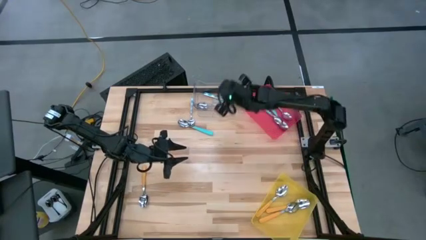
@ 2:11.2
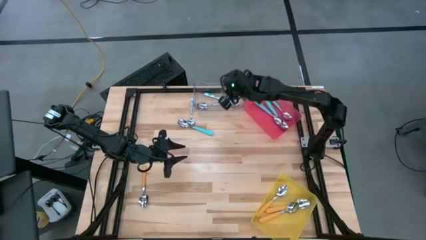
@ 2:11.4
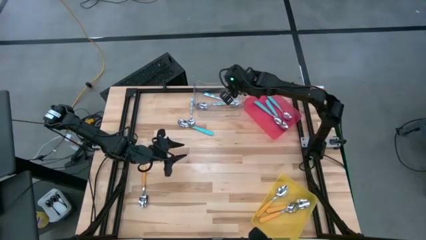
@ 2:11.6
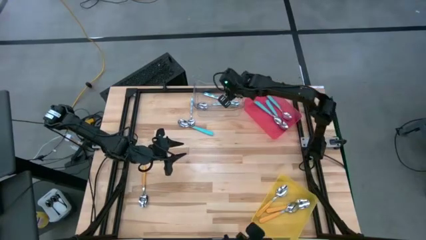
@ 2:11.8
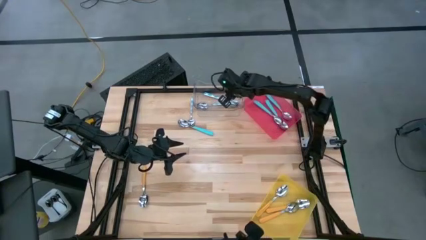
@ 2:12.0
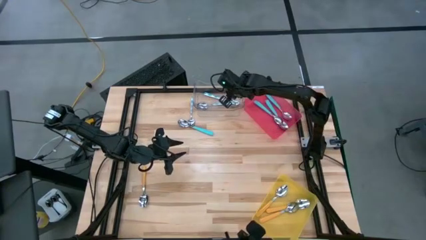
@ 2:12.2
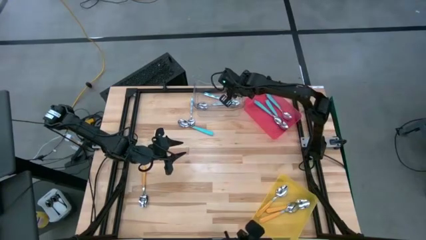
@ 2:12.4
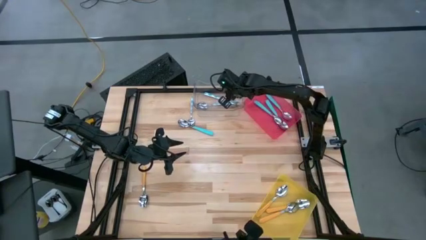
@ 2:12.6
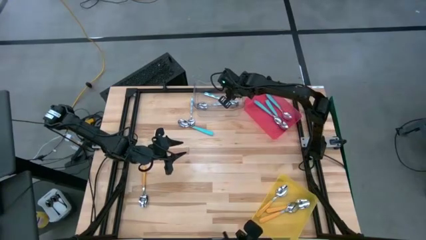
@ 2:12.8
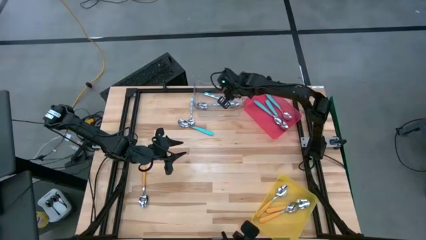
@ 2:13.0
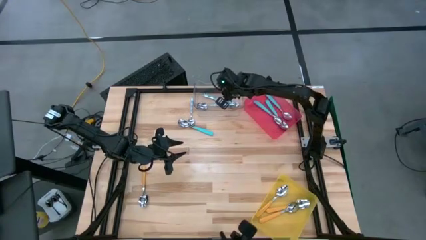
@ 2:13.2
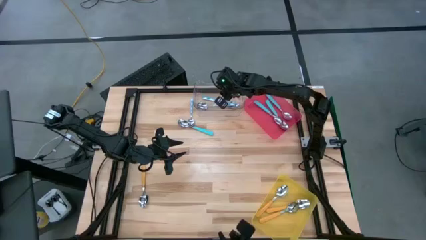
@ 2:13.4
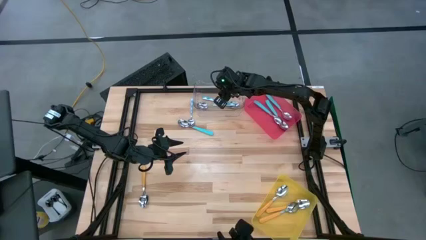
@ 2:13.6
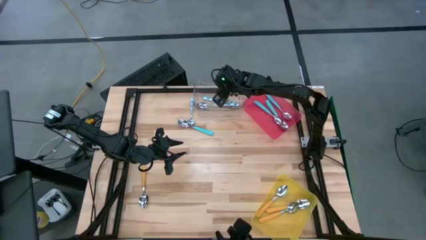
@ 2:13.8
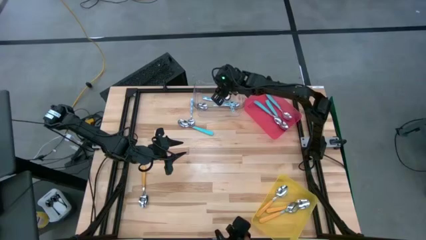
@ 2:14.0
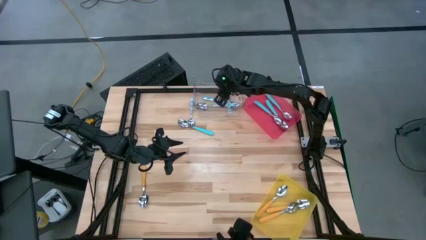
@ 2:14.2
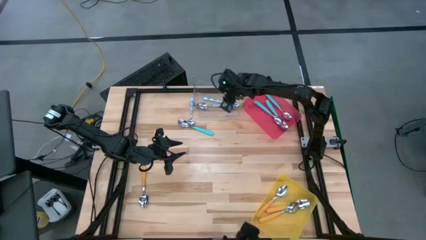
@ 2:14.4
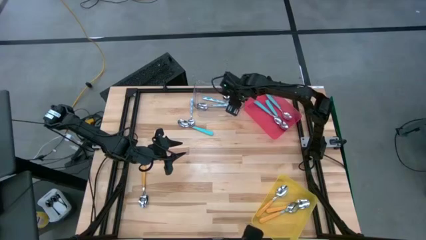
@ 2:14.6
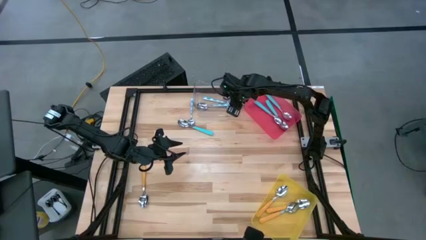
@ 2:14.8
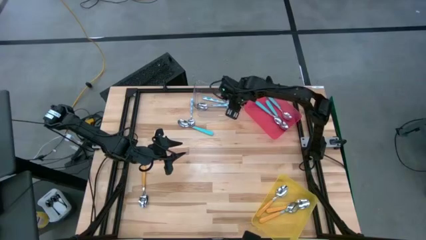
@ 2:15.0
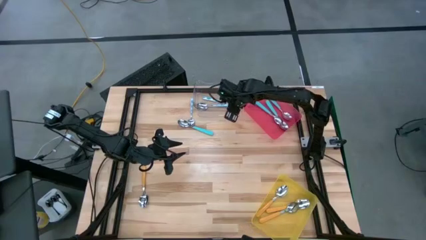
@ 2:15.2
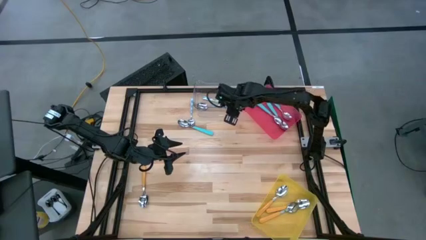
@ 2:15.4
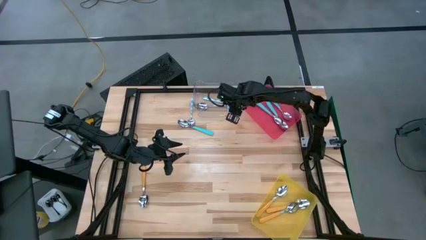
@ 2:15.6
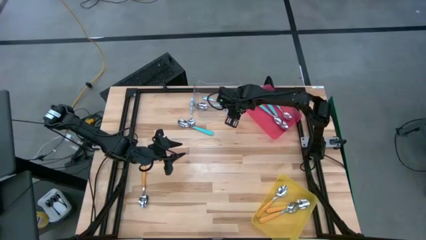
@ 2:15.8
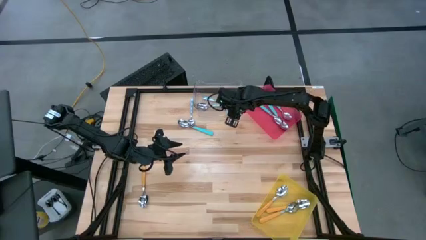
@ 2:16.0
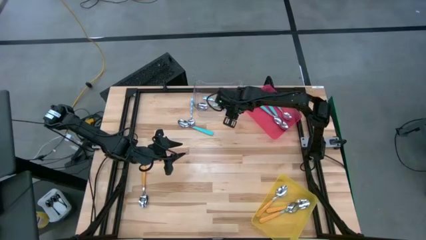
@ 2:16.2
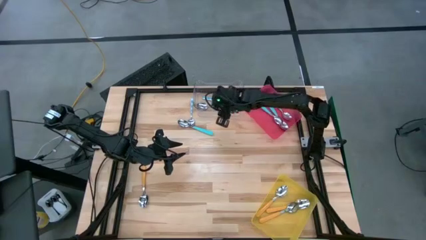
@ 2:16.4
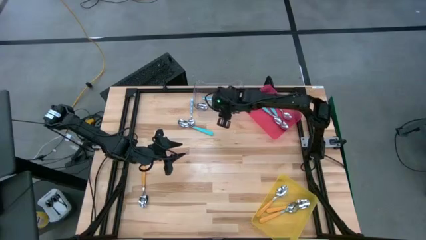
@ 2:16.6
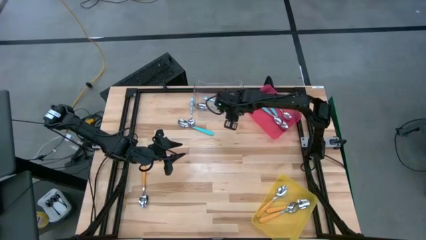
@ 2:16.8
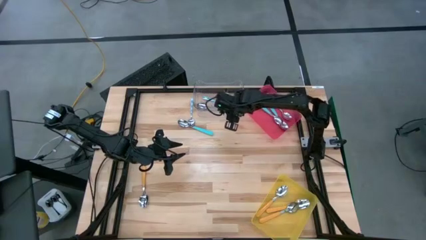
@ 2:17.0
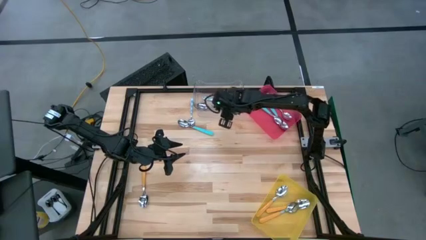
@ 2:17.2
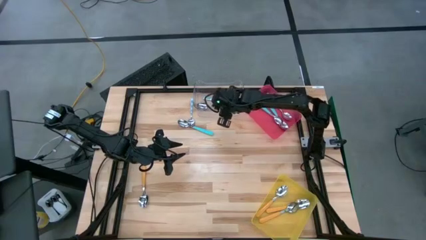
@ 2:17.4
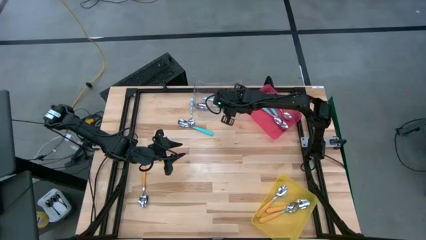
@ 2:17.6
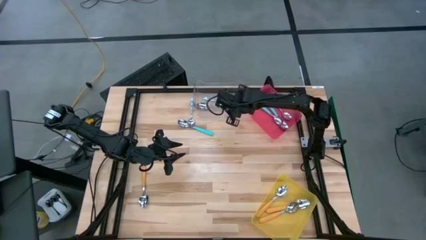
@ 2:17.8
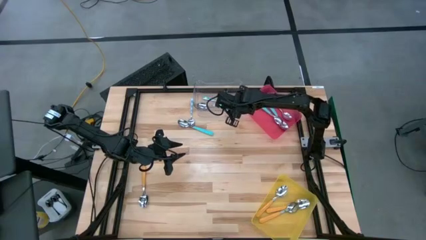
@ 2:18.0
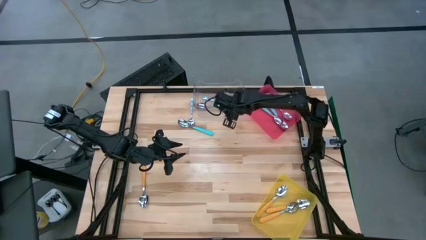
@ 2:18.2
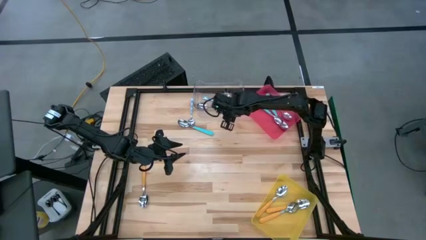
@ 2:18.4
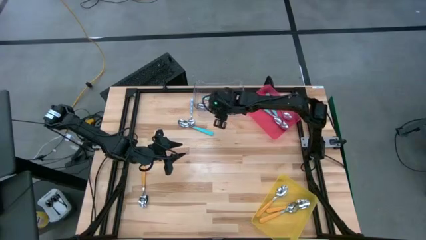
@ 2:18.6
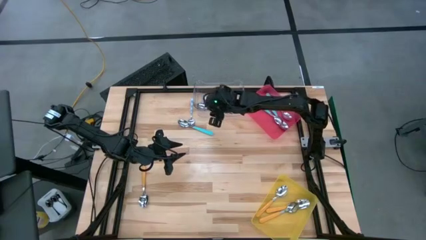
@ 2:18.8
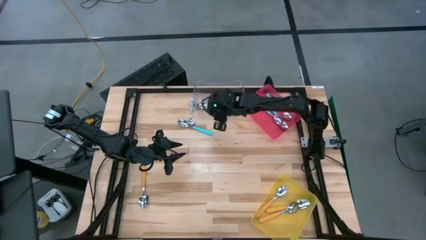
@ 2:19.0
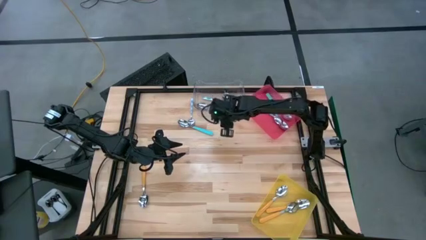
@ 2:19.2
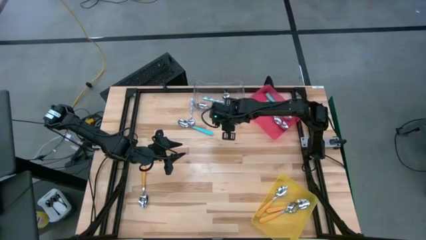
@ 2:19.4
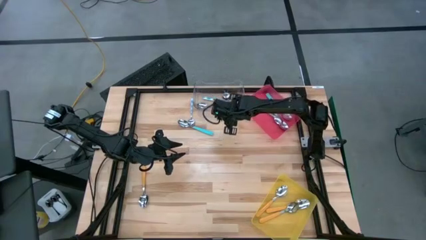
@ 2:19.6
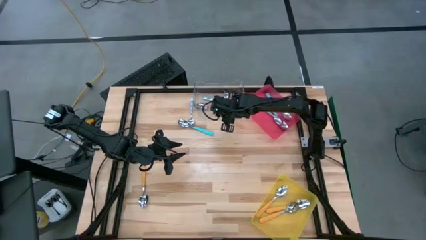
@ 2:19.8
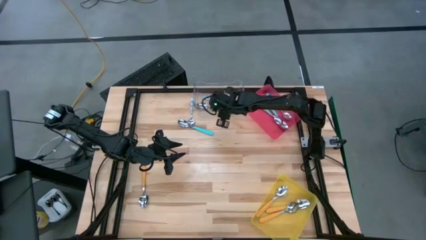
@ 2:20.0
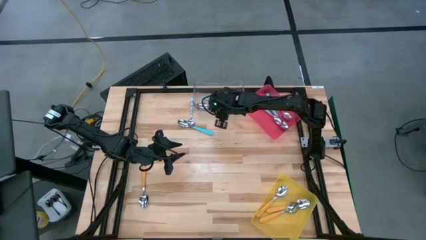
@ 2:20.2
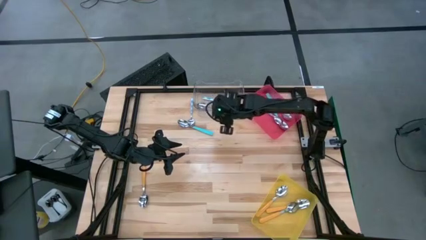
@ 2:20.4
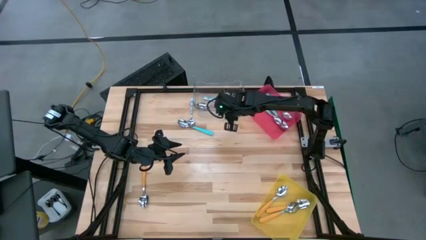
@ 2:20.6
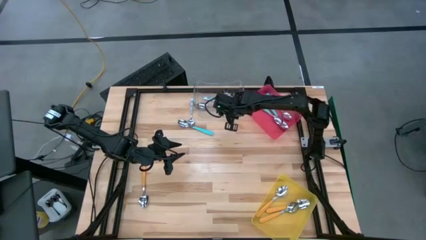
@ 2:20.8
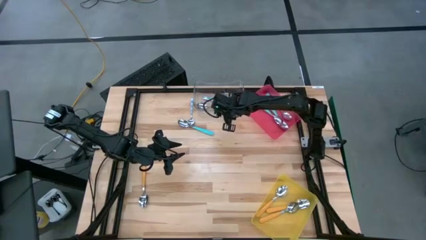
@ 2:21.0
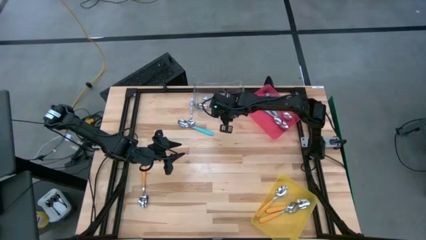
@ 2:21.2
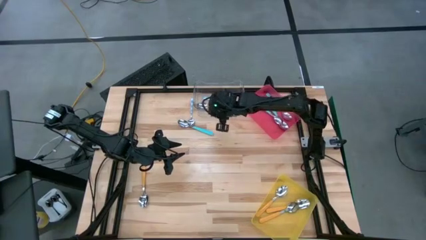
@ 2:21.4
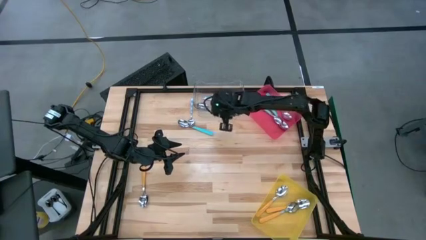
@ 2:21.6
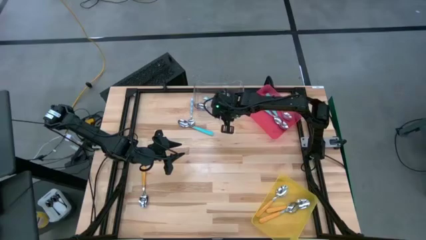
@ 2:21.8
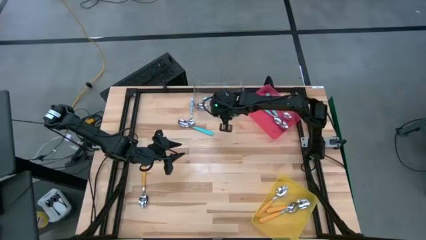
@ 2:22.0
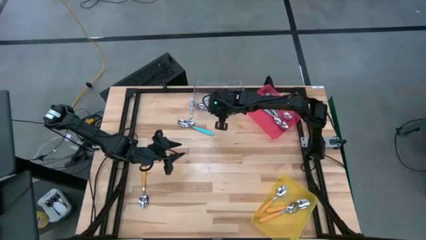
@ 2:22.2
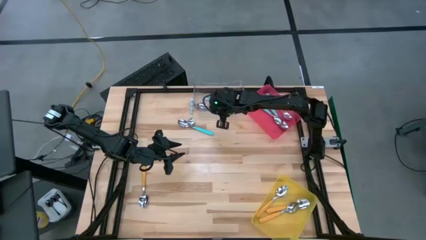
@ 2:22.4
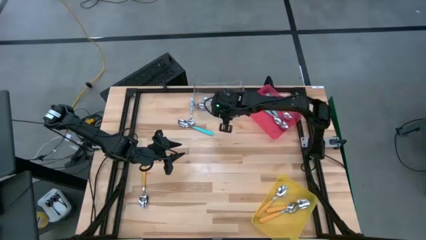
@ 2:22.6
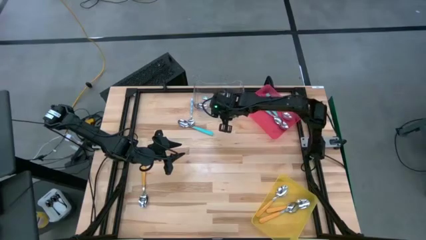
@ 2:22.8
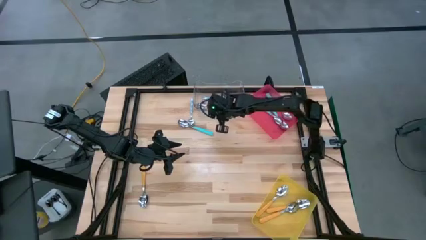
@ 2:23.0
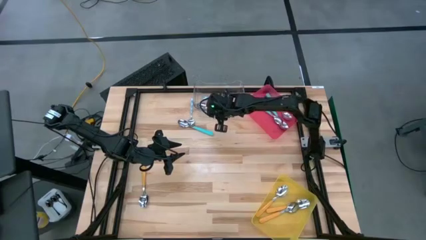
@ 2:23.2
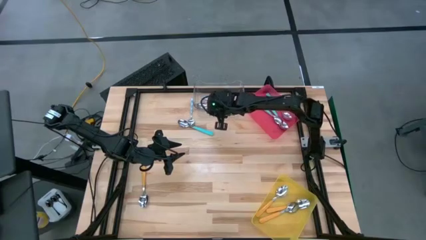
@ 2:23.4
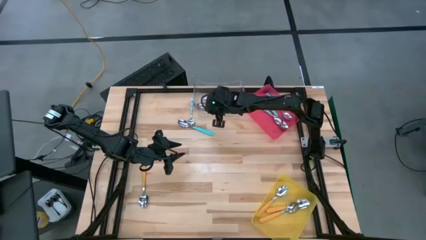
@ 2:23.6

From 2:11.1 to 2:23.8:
Task: Sort silverware by color (type)
Put the white-blue spoon into the transparent bin
